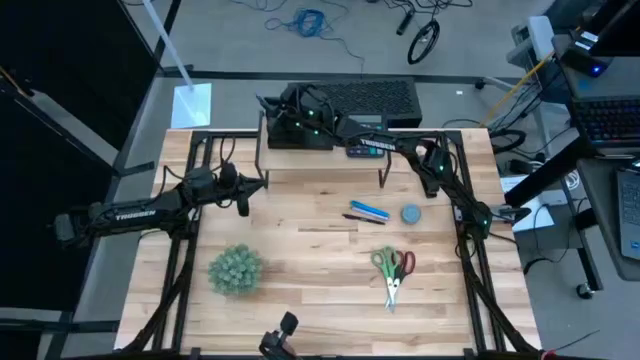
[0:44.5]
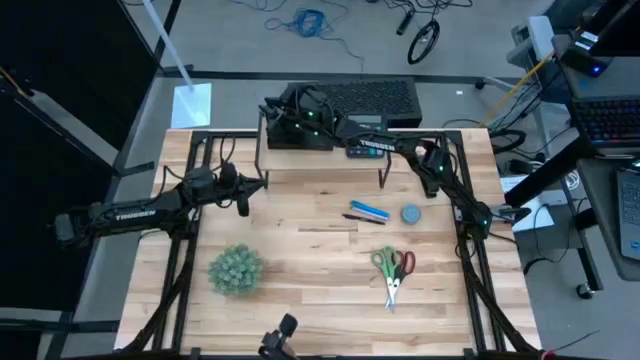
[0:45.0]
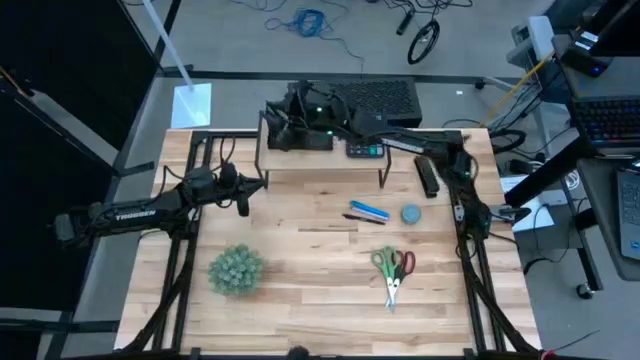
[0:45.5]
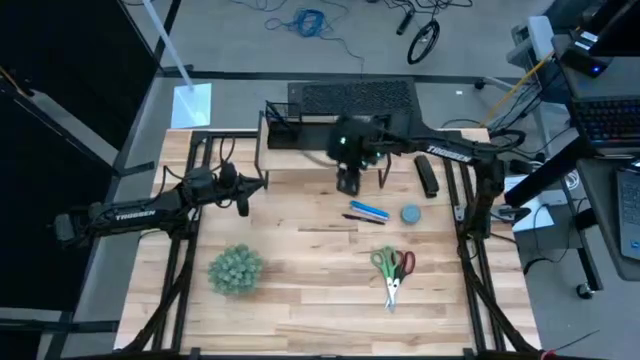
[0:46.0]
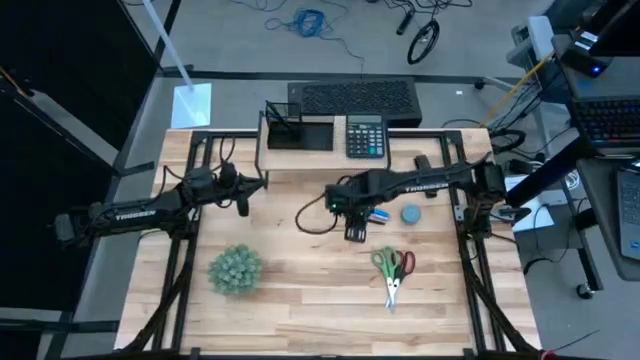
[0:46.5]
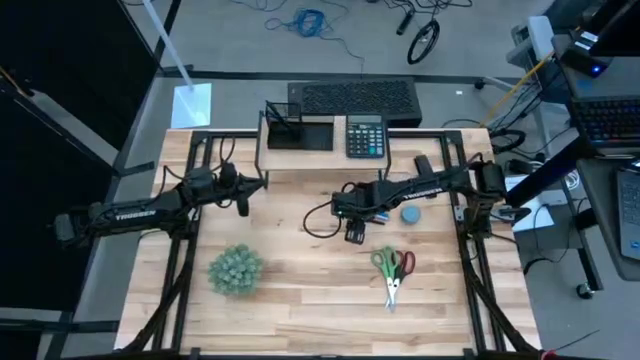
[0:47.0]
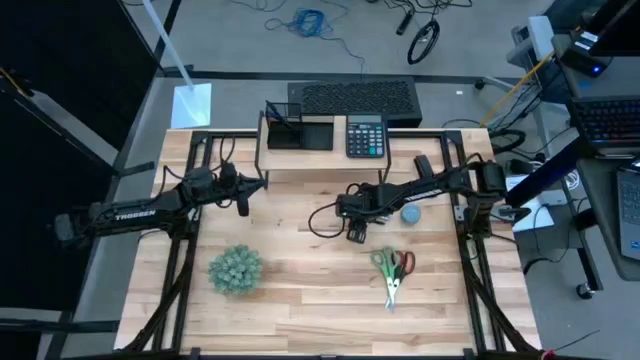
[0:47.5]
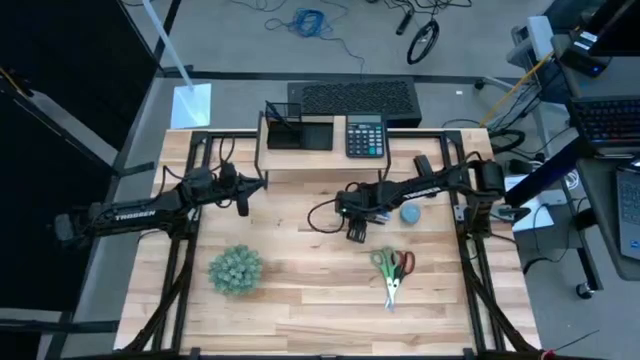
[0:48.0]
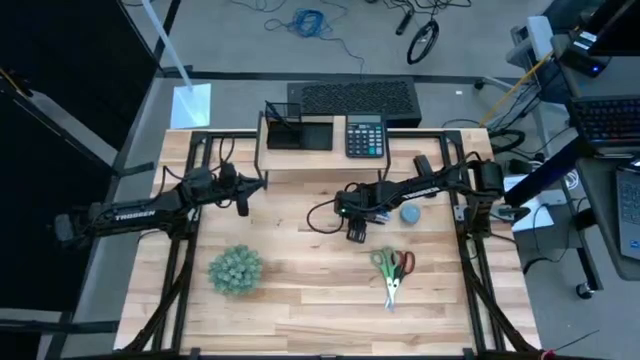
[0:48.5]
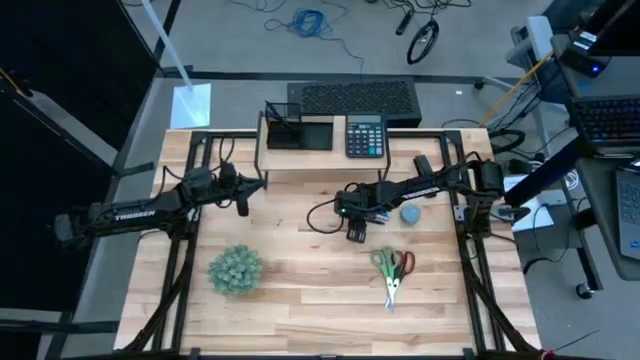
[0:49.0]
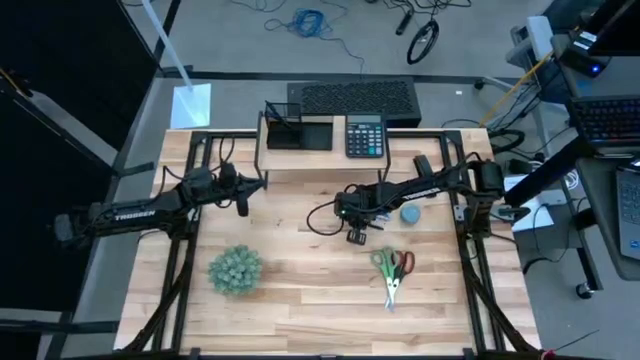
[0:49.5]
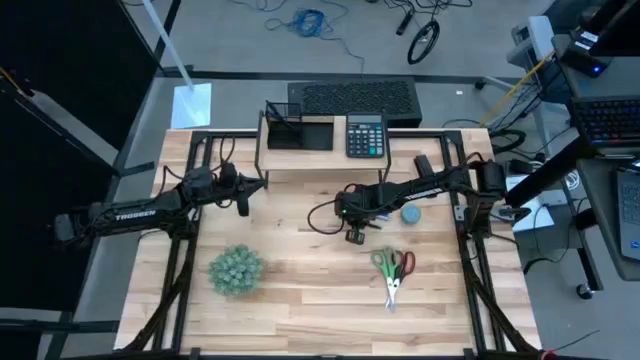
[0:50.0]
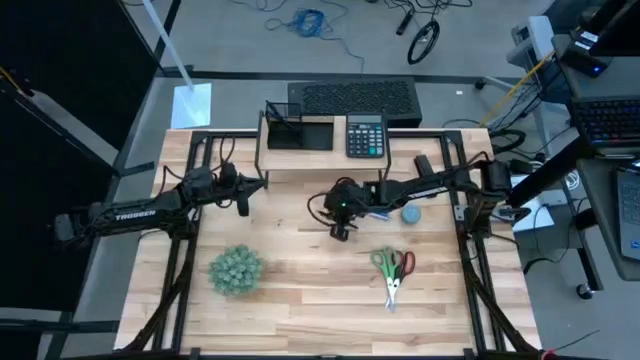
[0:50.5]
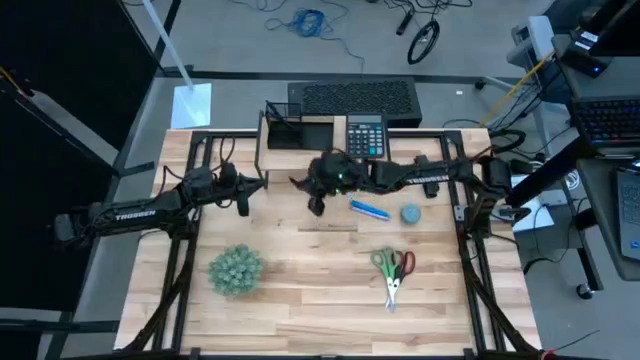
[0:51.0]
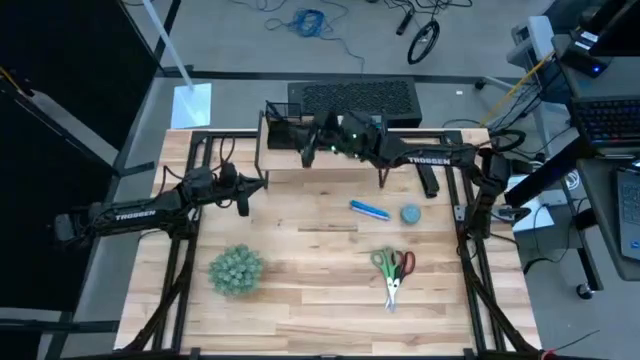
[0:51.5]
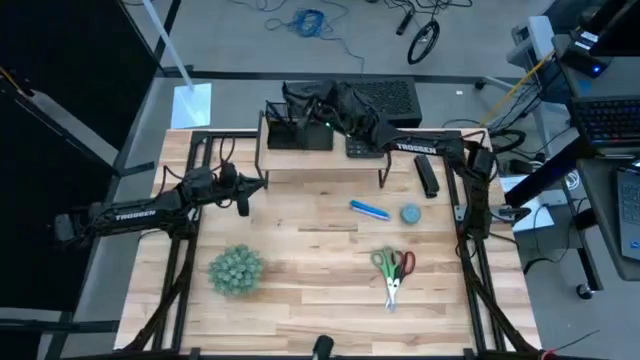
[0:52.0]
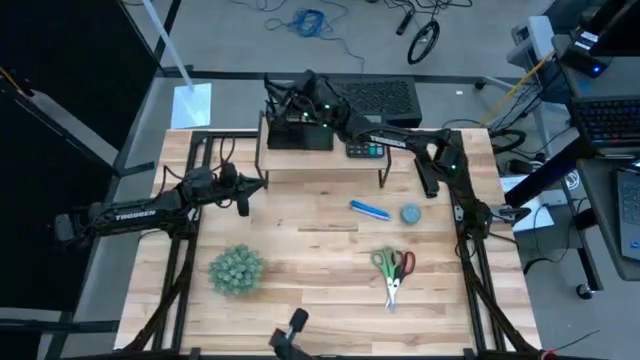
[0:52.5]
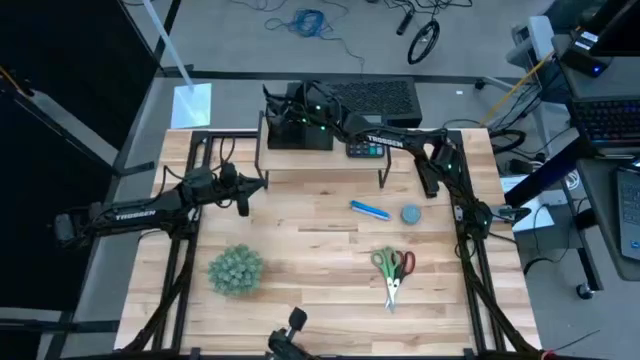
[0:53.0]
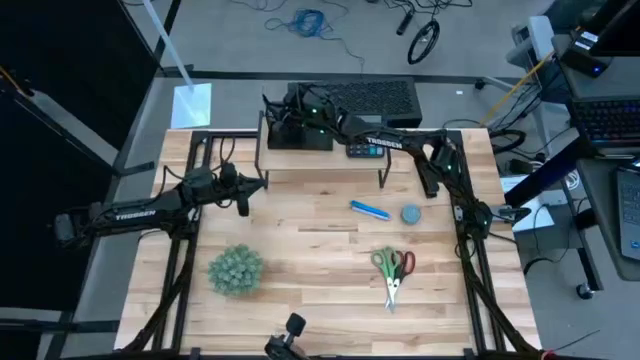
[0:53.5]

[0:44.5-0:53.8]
Task: Pick and place office supplies into organizer
Put the black pen into the desk organizer on the shelf

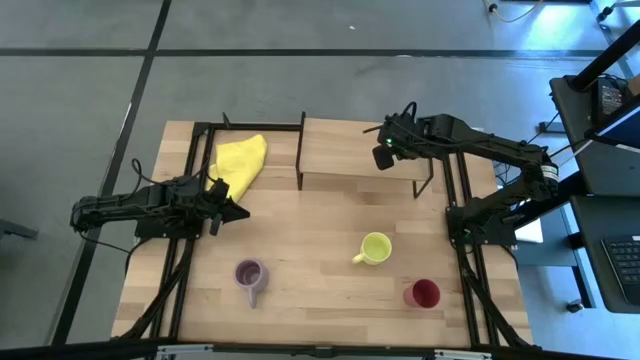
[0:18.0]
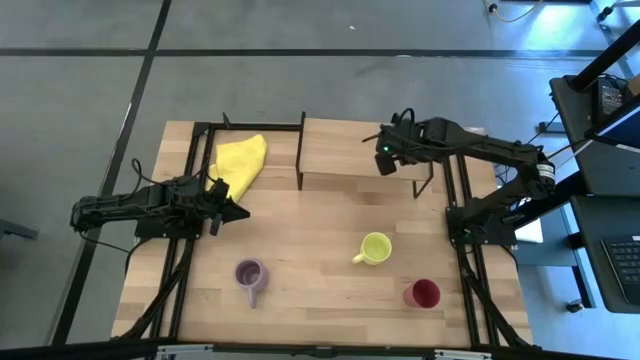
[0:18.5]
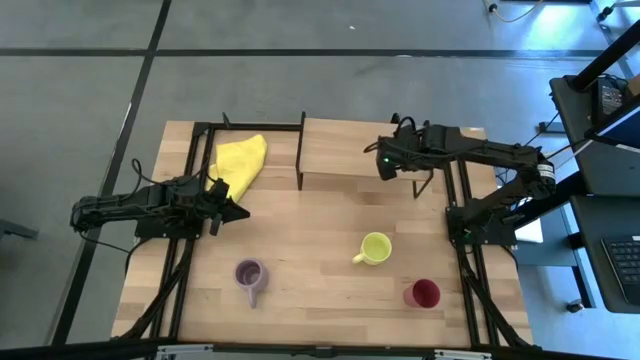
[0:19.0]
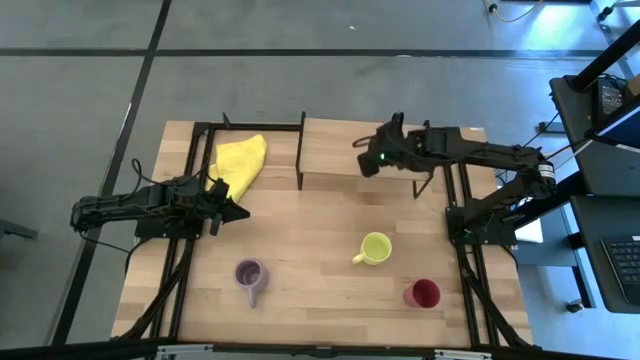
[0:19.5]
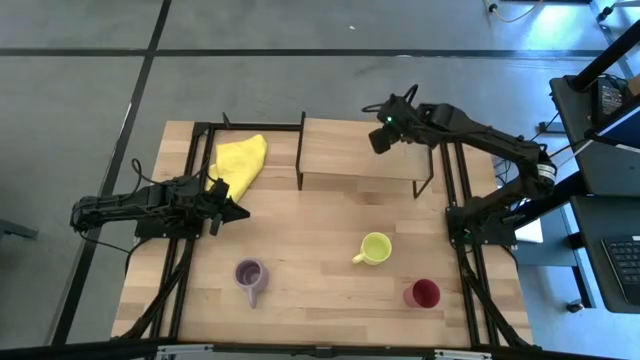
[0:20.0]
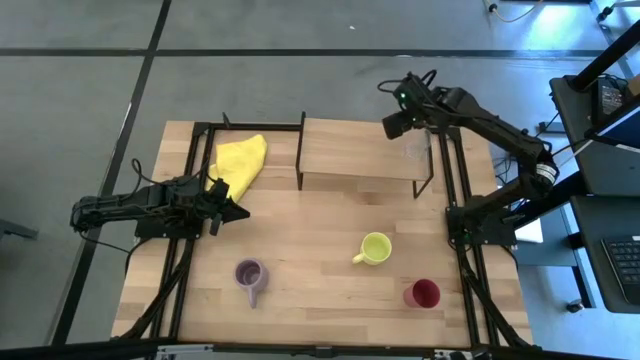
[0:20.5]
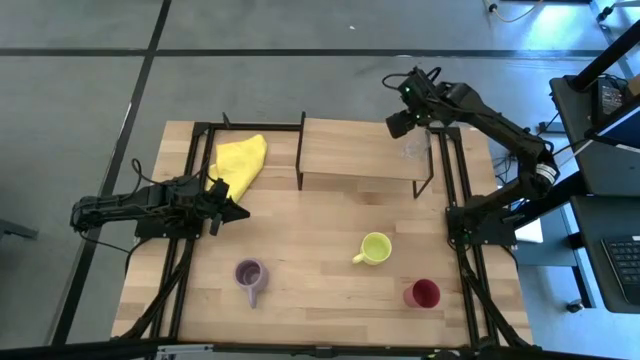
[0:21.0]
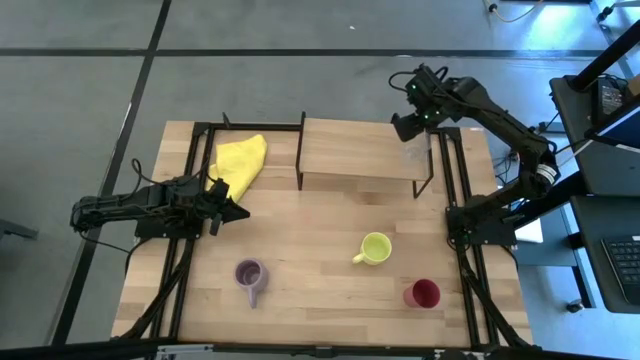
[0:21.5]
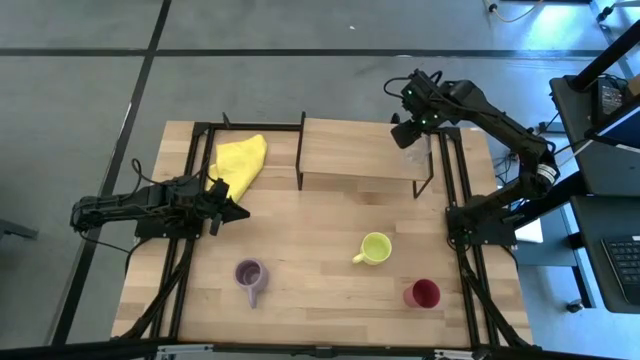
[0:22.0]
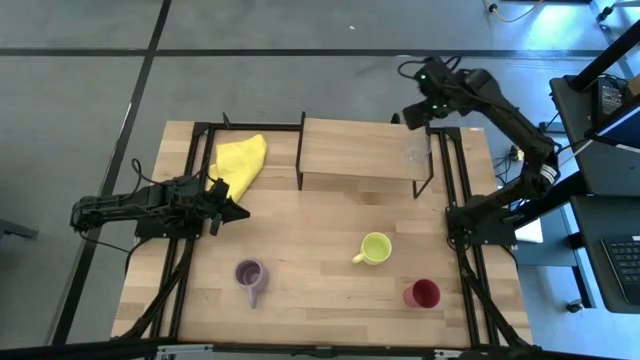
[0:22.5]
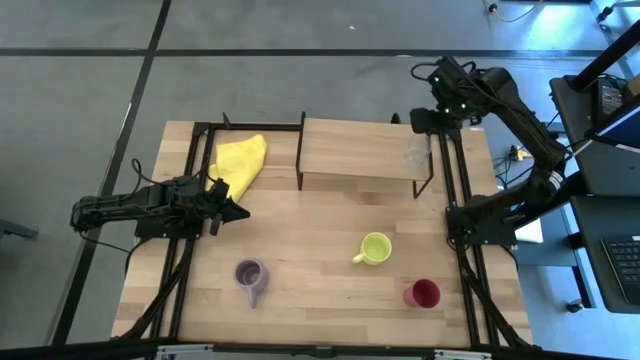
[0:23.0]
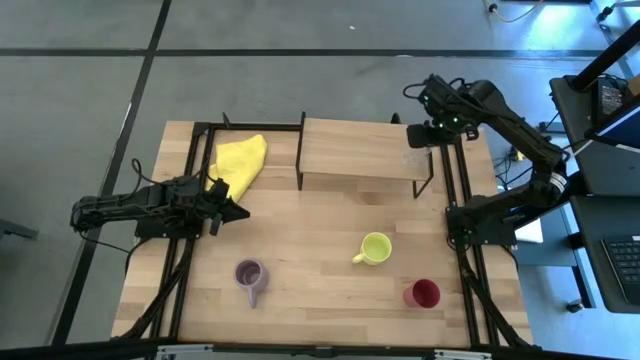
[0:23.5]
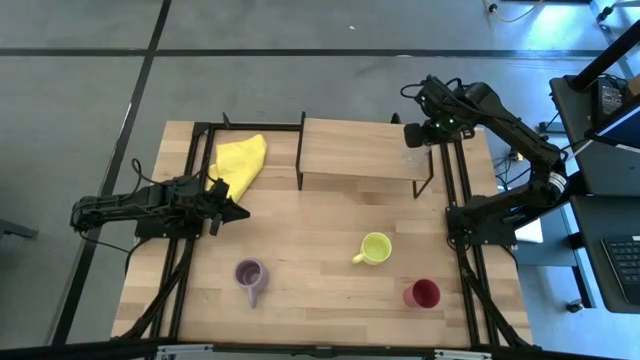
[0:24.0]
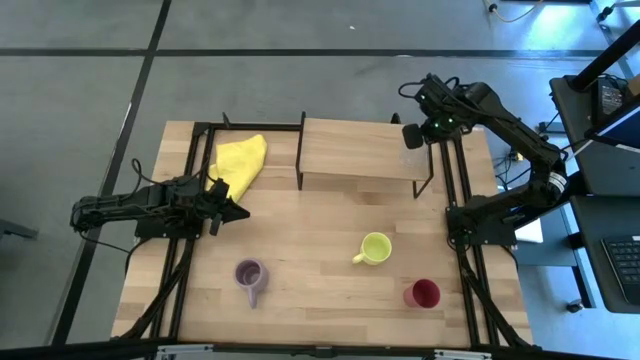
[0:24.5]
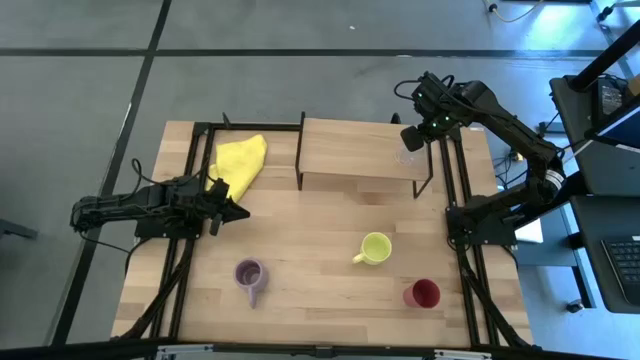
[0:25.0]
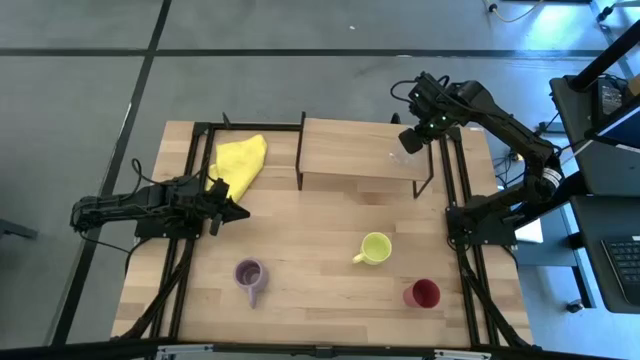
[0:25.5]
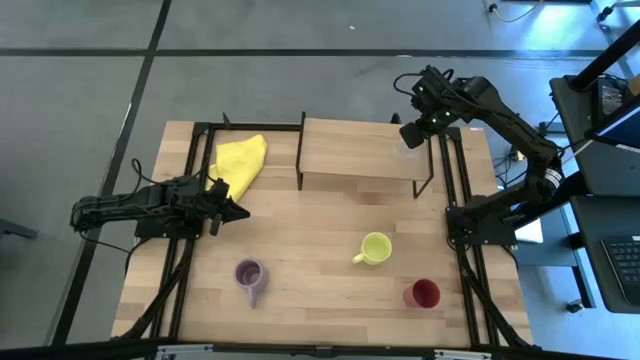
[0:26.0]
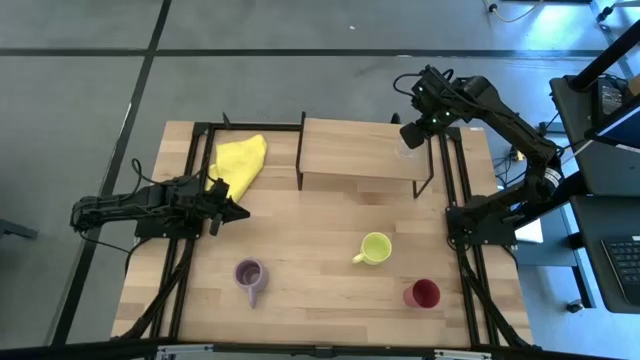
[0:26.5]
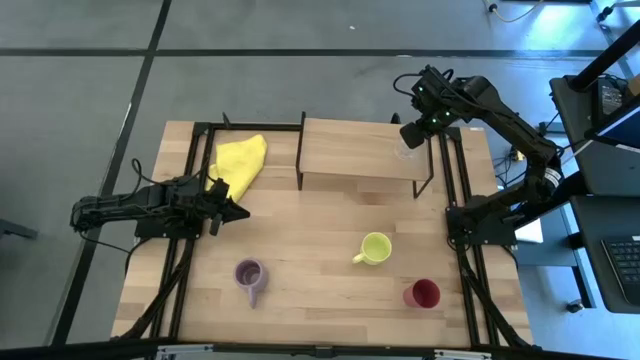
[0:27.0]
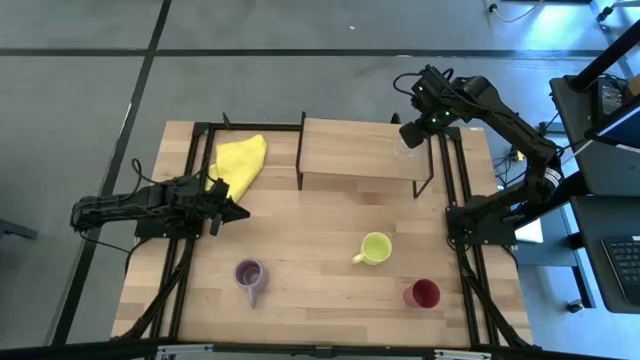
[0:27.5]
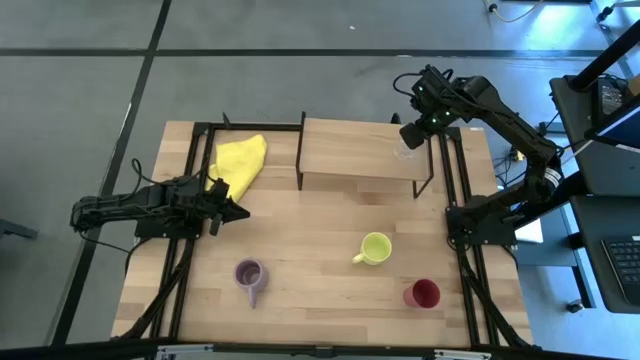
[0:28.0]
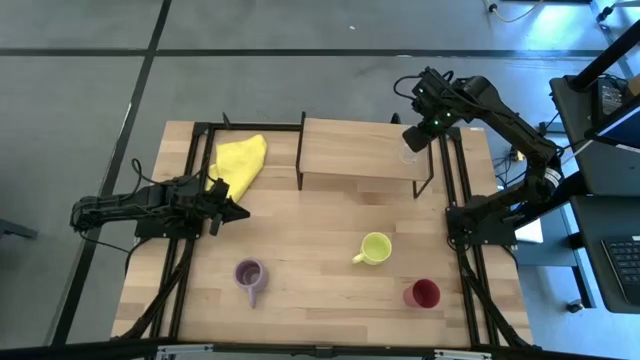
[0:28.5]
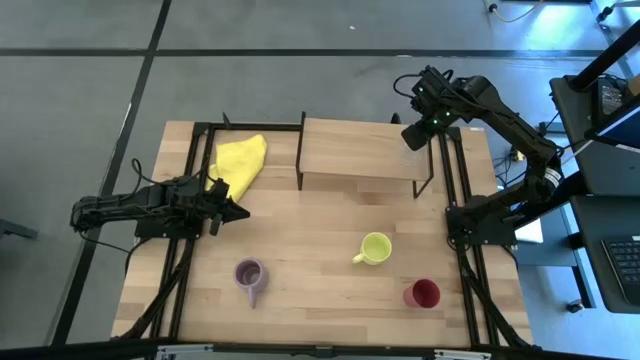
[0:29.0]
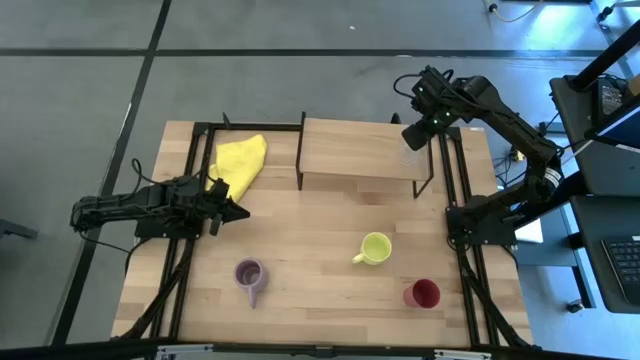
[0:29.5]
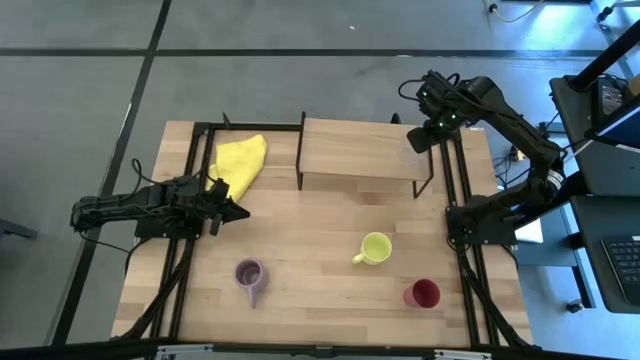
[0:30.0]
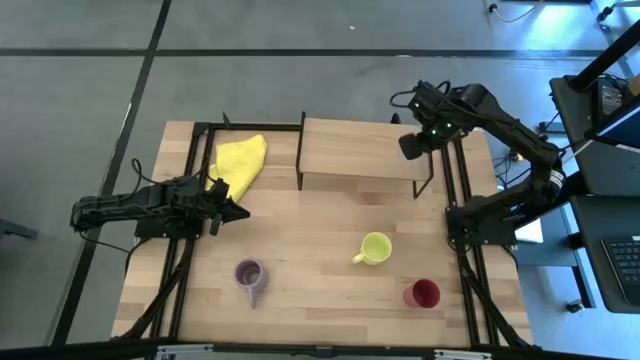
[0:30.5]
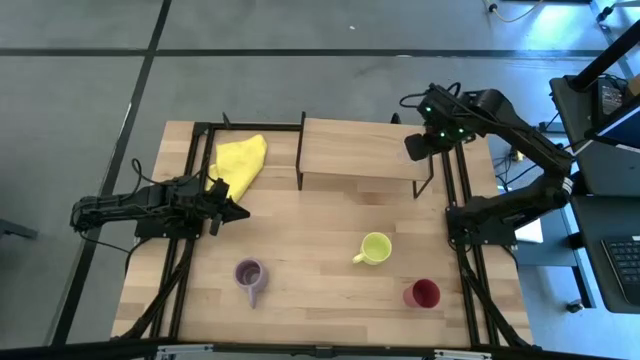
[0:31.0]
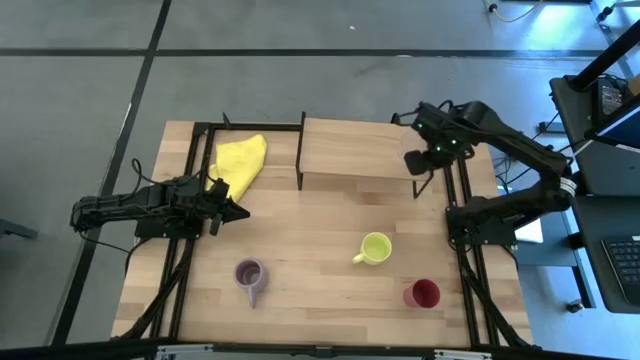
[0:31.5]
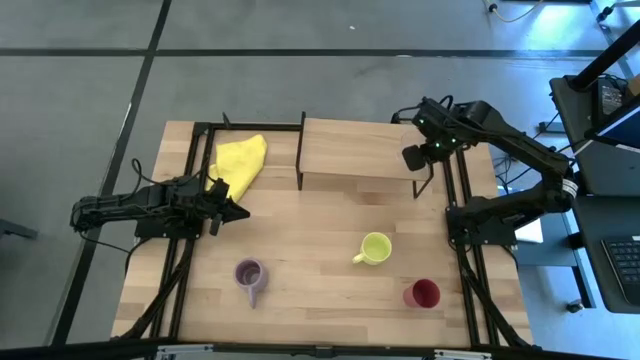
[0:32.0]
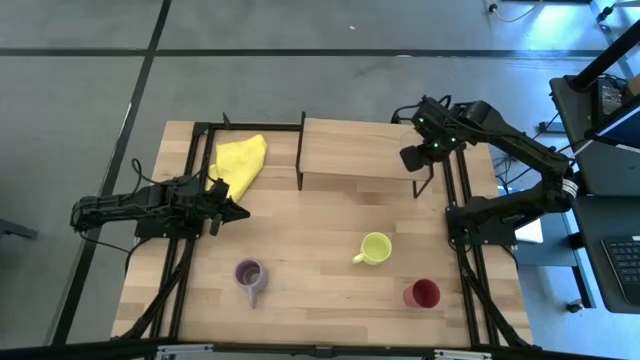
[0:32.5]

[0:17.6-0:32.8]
Task: Stack small to large cups/mugs on shelf
Put the transparent mug on the shelf
